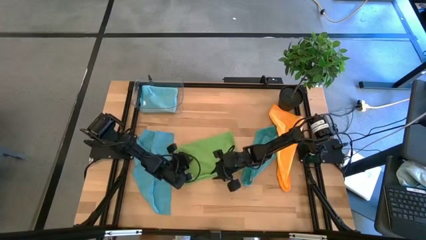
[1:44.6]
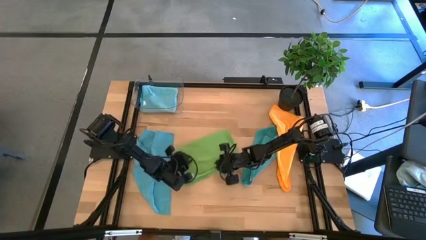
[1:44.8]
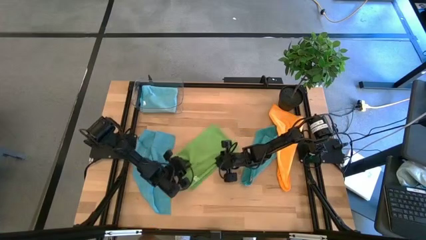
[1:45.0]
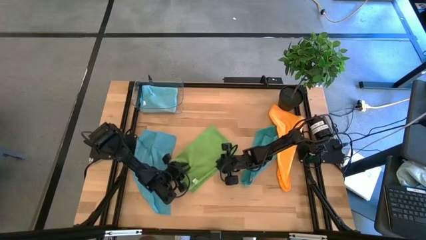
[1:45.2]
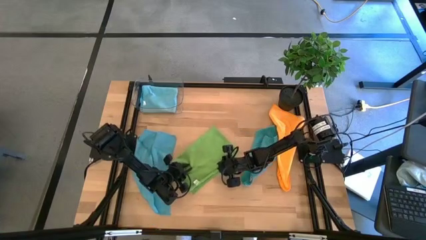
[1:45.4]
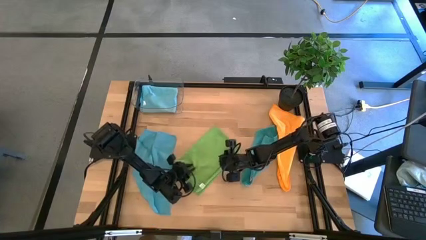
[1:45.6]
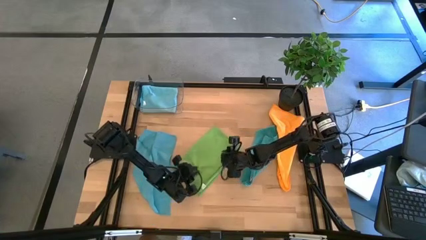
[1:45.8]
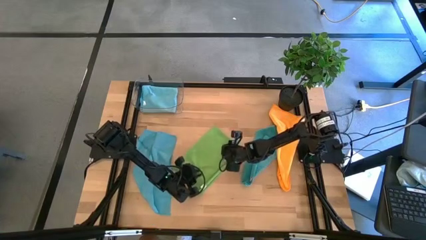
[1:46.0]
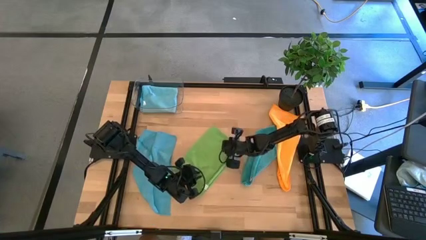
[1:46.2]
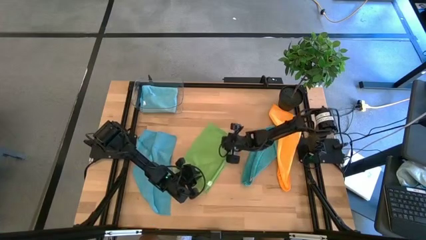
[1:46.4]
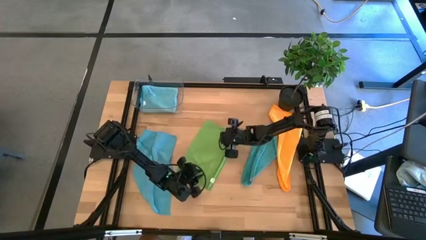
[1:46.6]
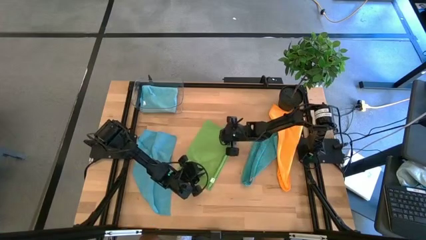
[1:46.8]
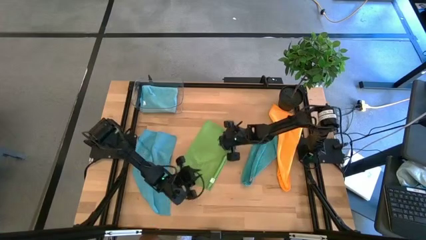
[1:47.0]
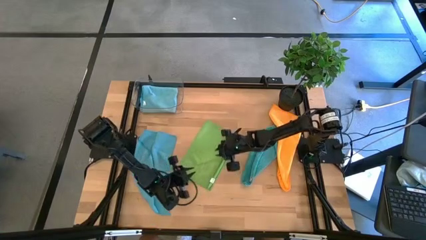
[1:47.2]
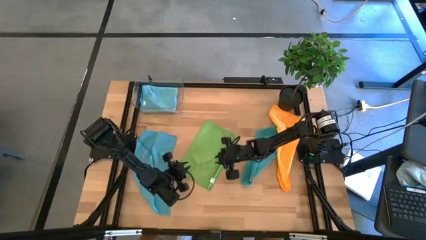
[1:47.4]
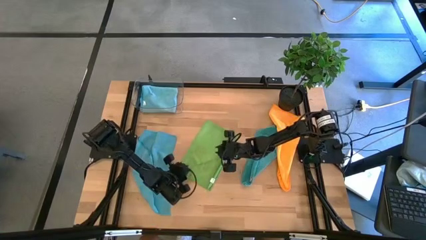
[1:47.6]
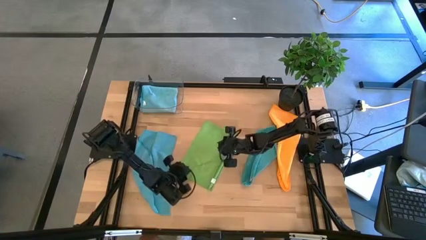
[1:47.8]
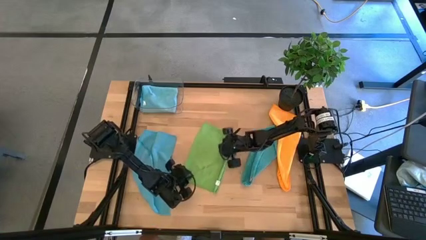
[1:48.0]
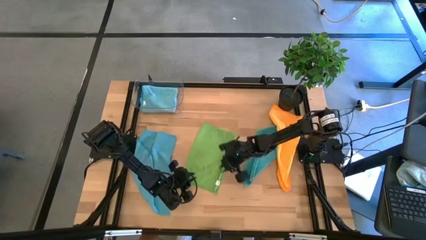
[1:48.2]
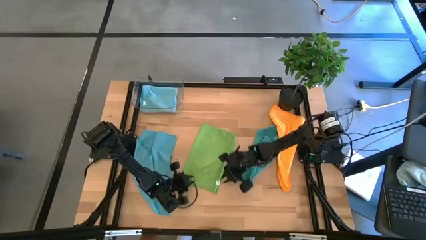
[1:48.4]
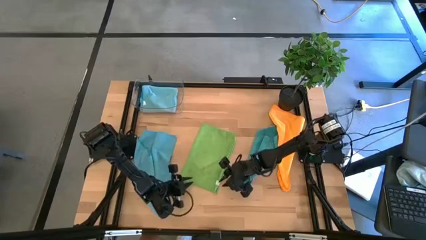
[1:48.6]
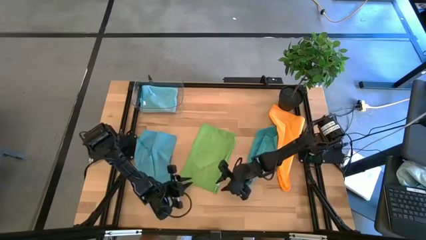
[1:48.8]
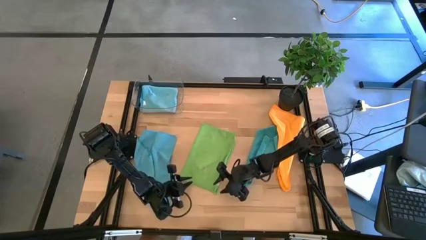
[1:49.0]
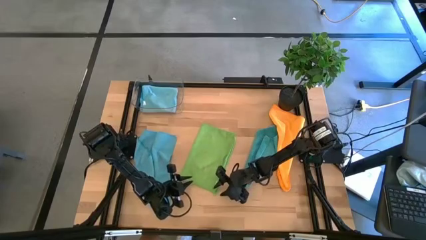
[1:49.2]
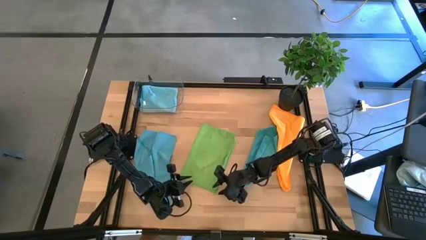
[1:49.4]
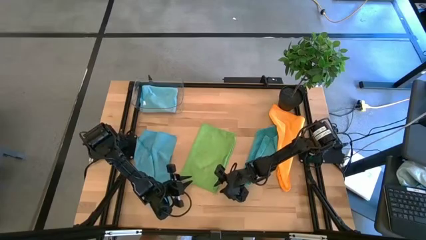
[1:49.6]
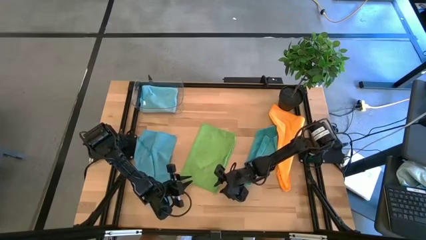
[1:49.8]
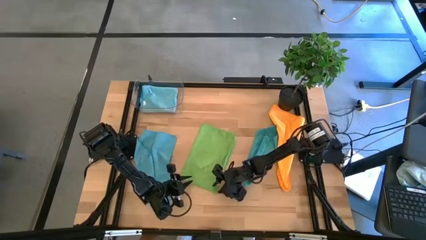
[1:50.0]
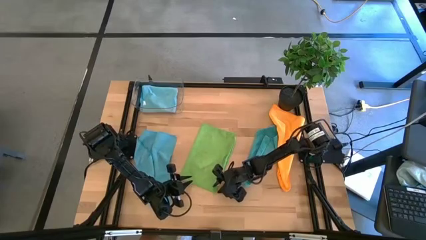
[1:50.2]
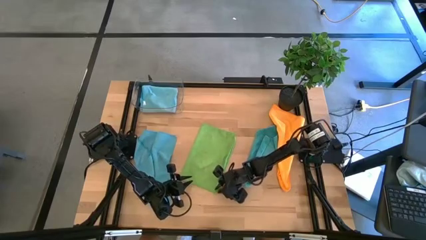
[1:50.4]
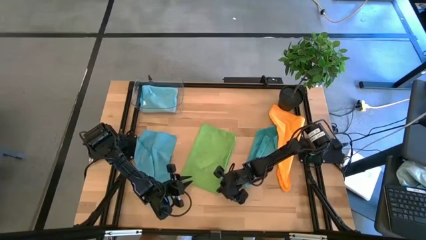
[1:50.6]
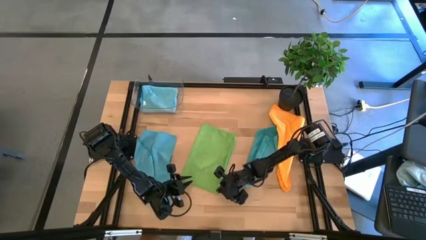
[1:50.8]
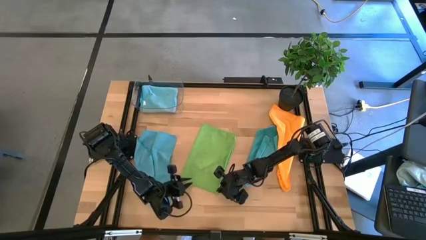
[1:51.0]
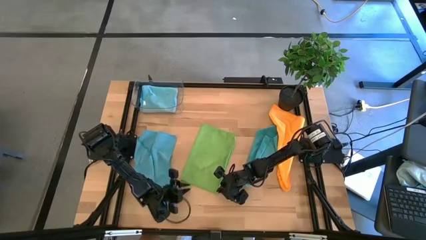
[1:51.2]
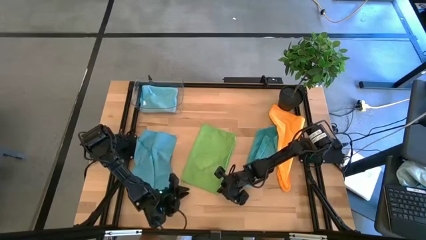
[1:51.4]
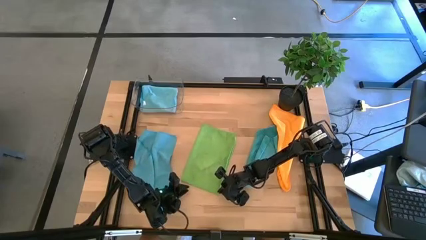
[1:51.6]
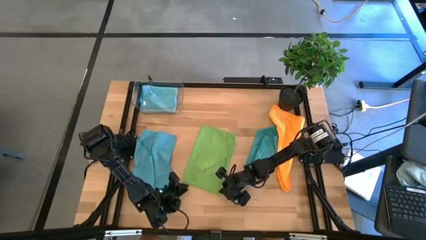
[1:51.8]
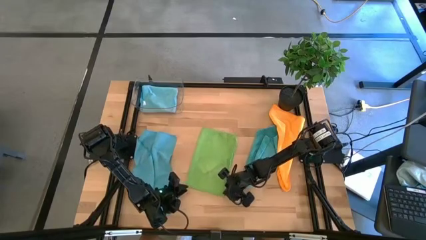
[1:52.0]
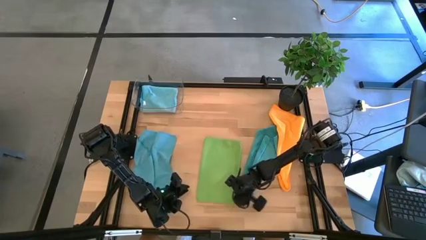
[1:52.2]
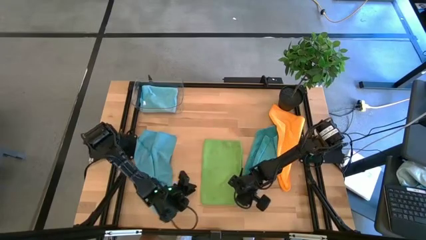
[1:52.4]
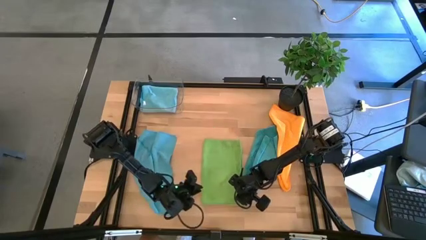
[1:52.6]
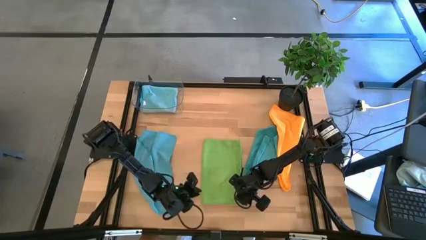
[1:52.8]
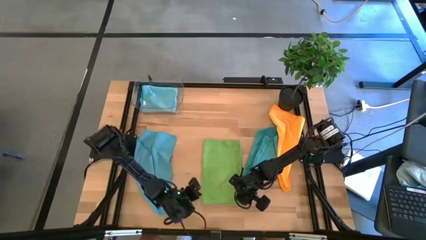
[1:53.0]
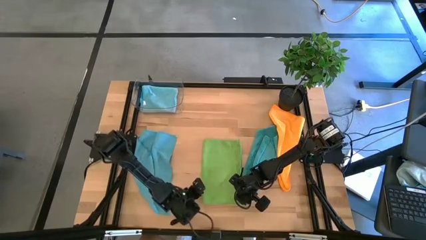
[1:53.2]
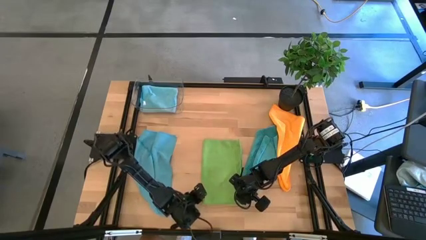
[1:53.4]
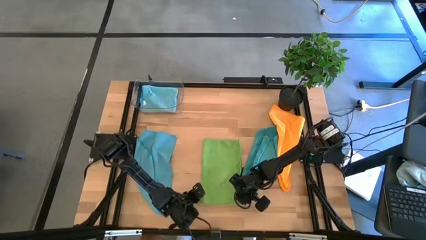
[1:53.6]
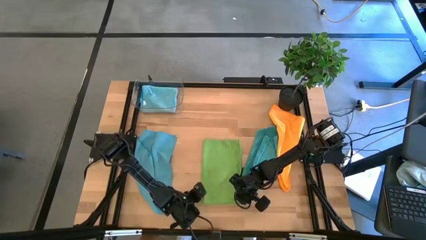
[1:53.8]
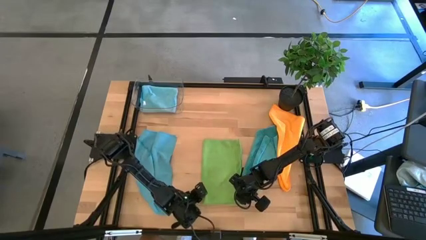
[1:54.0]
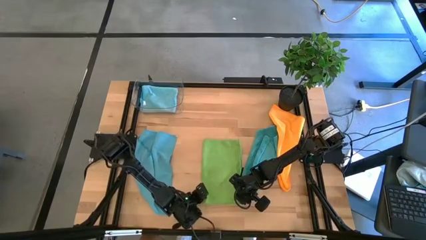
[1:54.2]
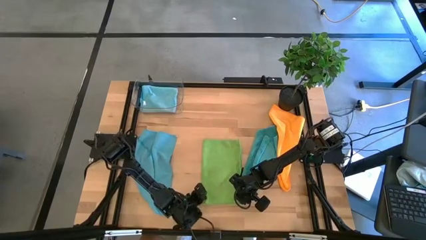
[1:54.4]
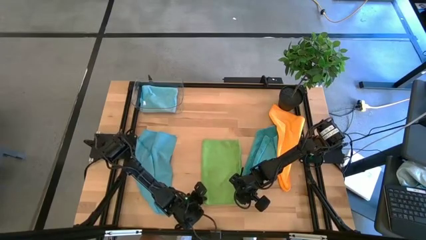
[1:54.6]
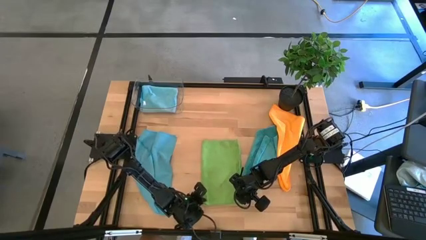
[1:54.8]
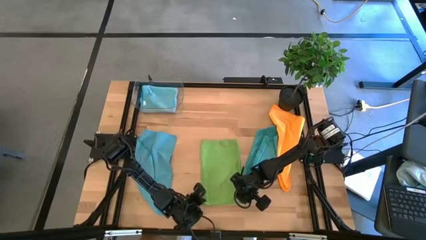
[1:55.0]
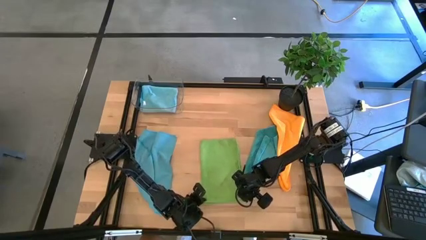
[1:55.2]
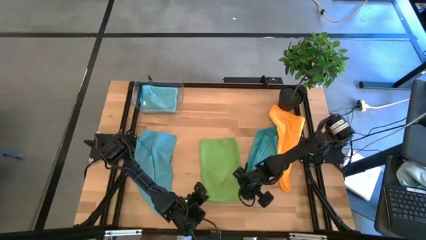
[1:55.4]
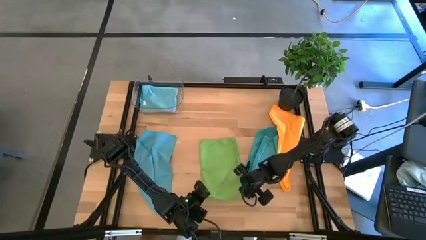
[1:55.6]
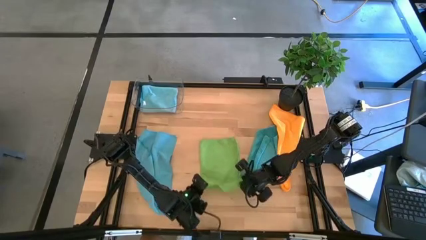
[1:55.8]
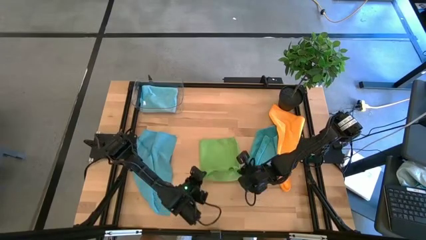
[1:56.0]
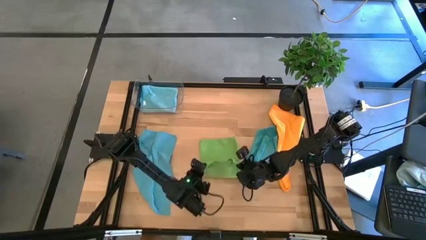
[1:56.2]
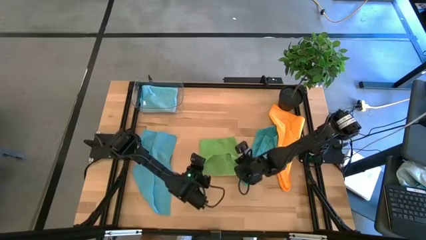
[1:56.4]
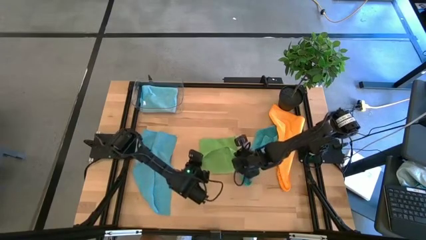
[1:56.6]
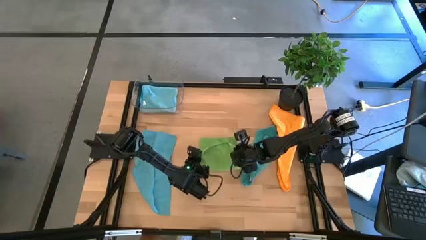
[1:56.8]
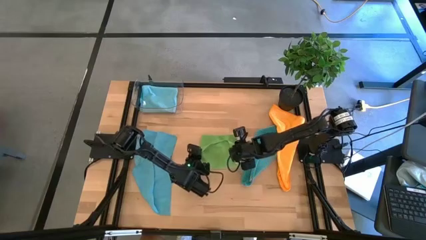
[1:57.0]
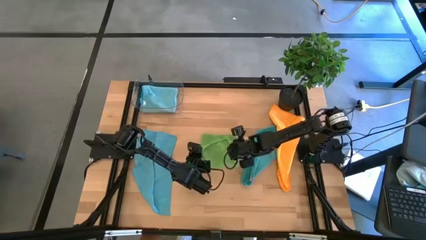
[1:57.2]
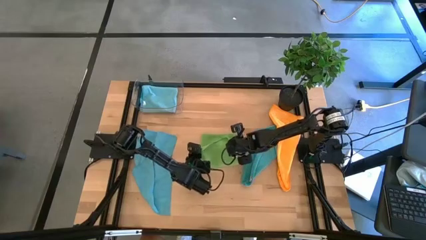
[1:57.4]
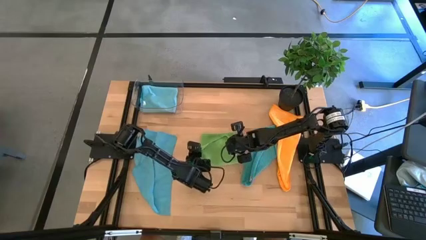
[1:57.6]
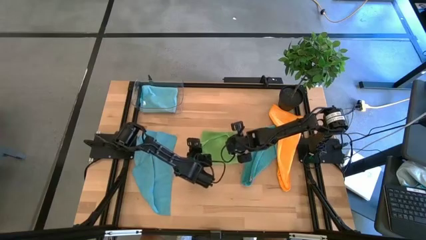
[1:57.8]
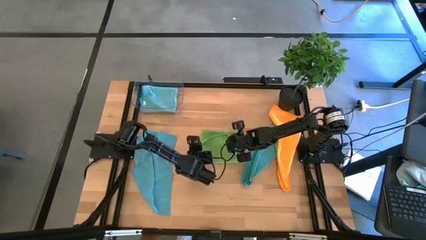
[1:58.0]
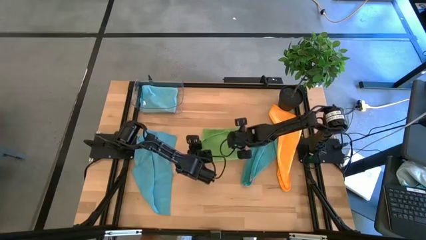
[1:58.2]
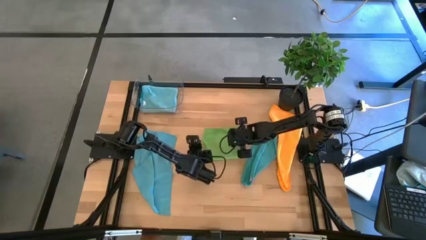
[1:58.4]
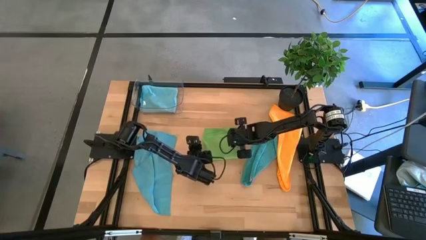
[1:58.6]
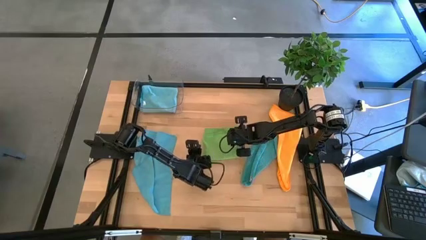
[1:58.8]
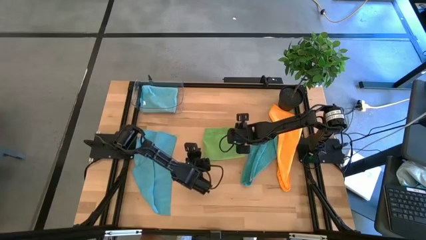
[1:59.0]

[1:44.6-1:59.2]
Task: Fold microfiber towels
Fold the green microfiber cloth
